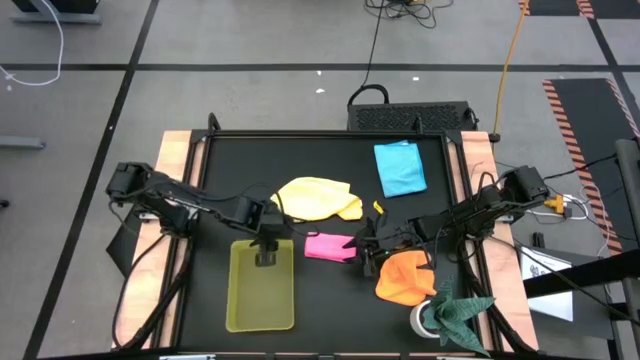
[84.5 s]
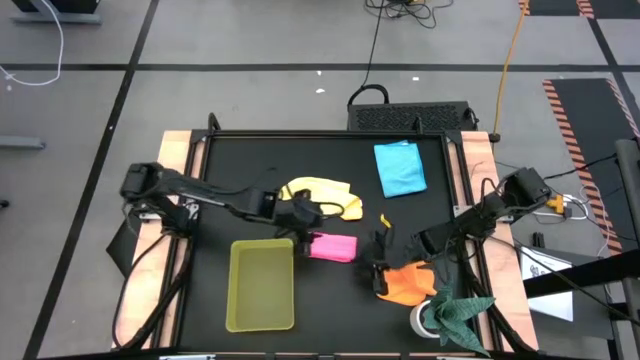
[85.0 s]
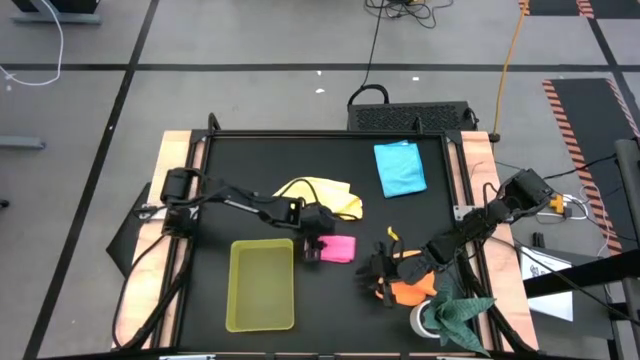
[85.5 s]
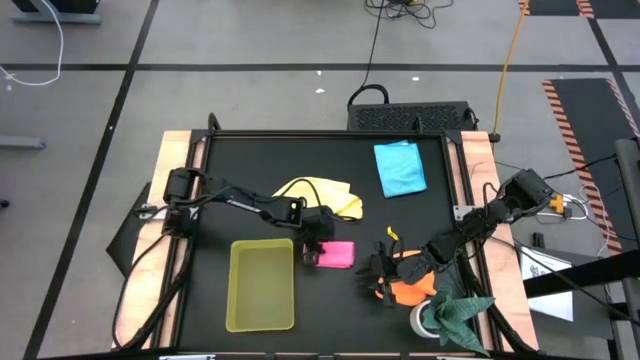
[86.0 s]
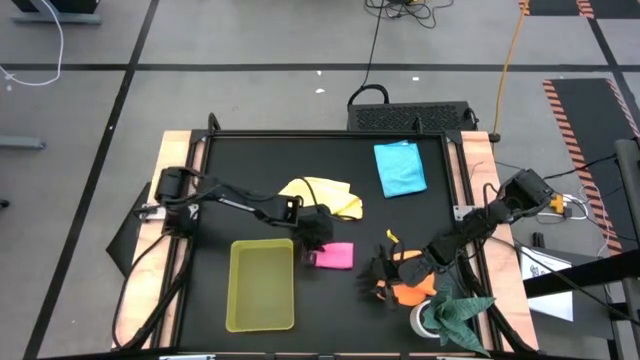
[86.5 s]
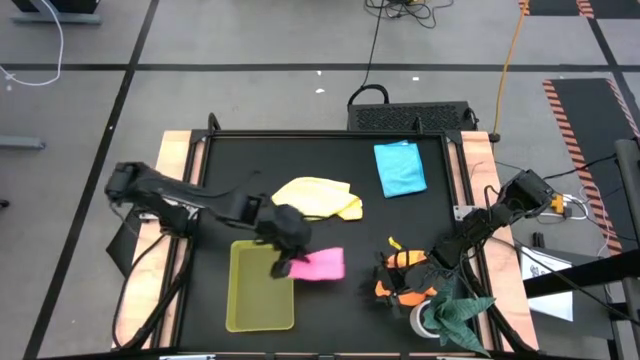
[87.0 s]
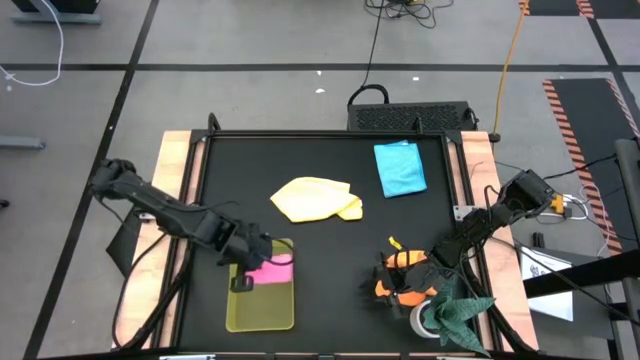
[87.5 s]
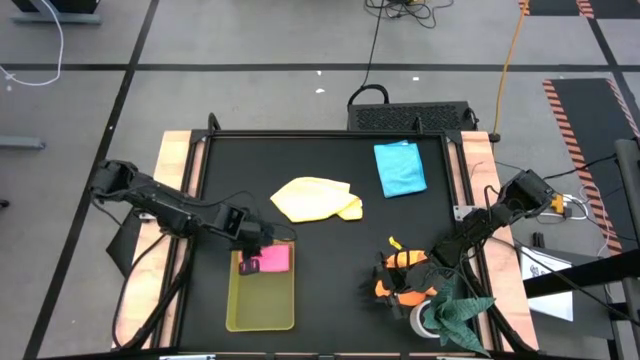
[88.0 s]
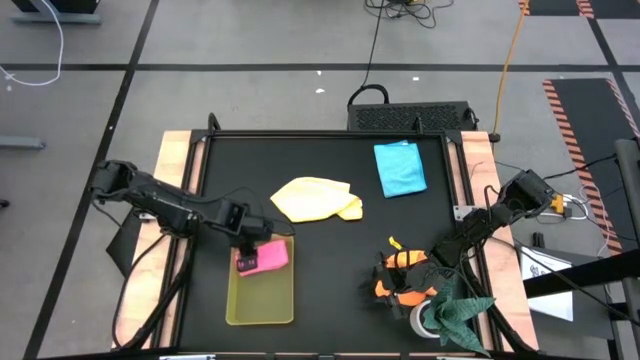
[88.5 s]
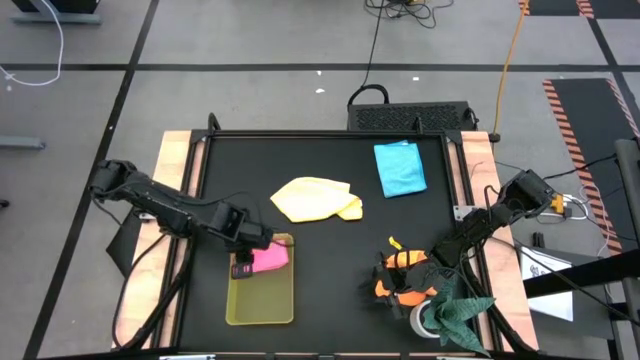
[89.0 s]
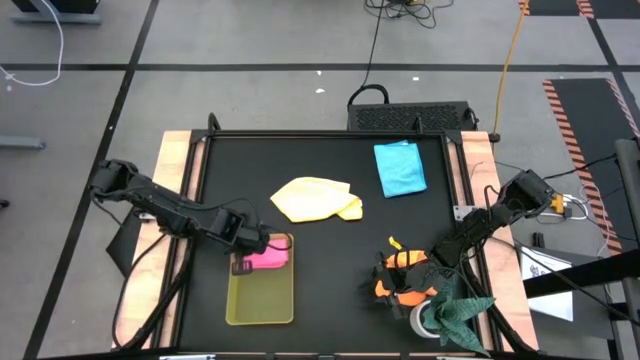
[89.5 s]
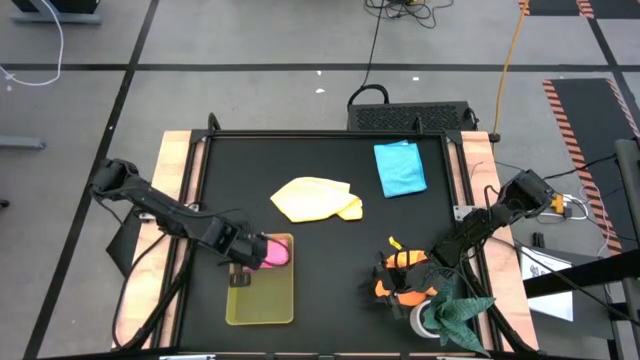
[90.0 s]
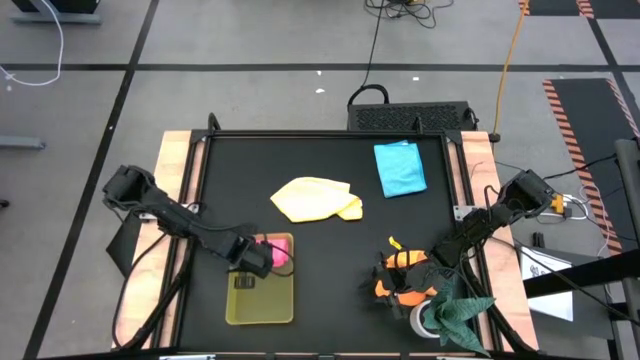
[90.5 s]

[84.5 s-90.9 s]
Task: Fold microfiber towels
Put the pink microfiber towel into the yellow bin

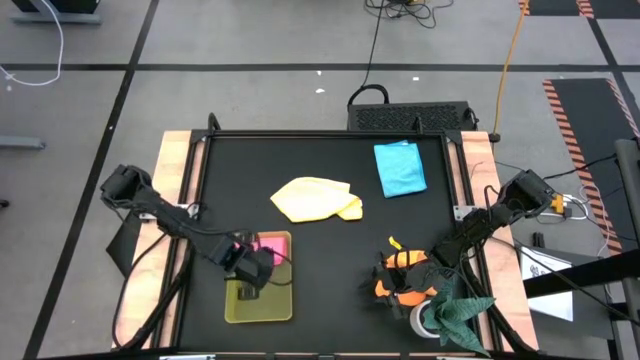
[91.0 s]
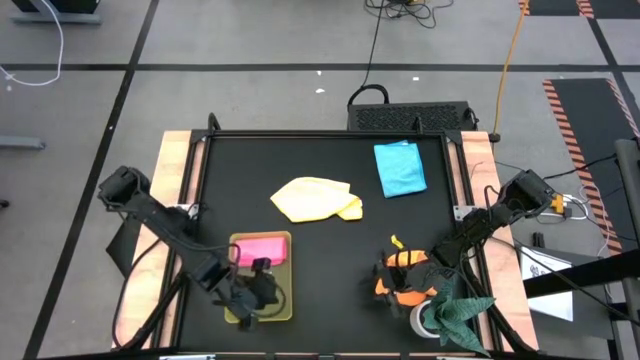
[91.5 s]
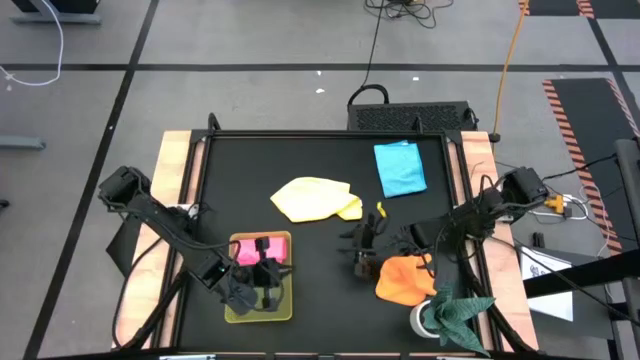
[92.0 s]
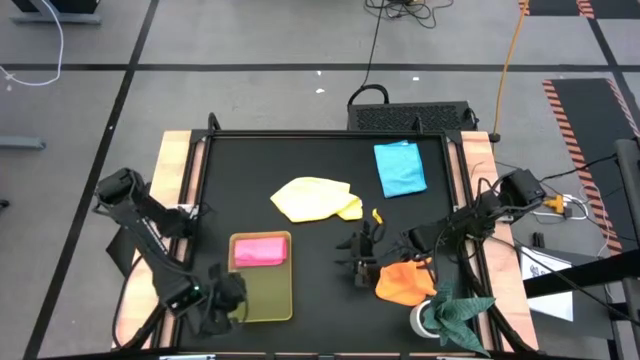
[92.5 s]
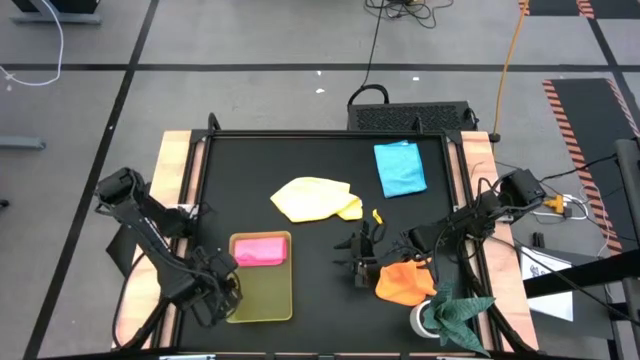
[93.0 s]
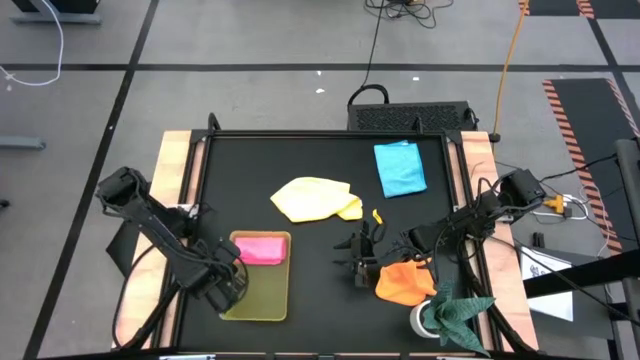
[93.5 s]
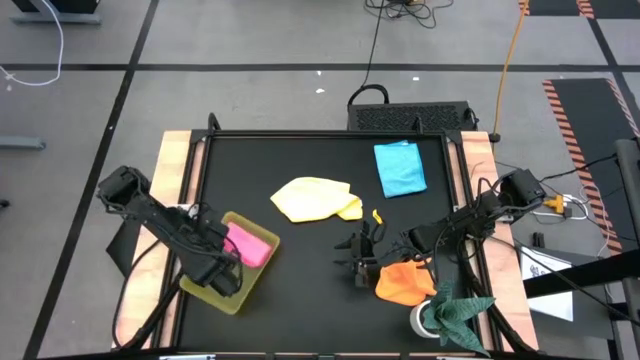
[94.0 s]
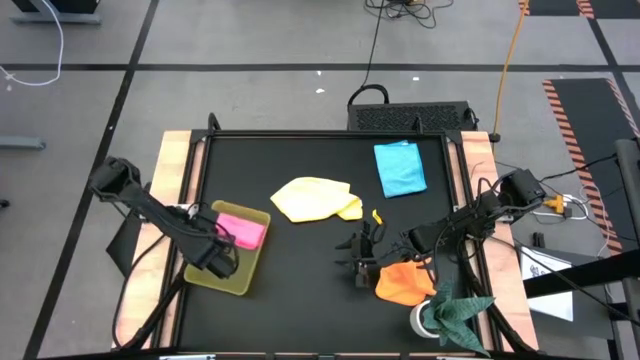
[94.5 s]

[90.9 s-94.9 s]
Adjust the yellow bin on the table

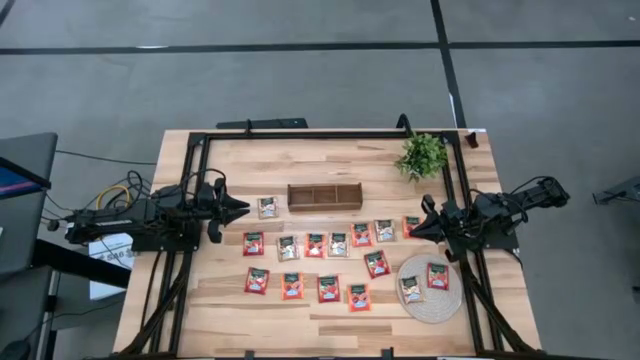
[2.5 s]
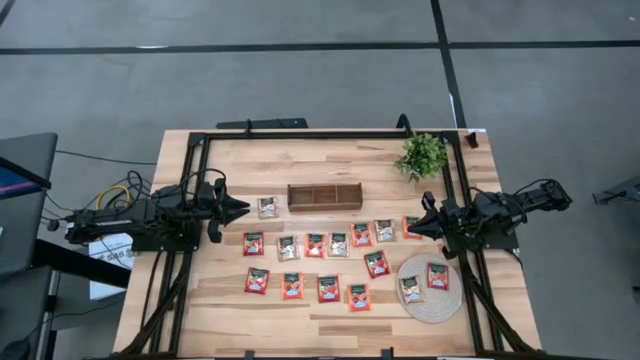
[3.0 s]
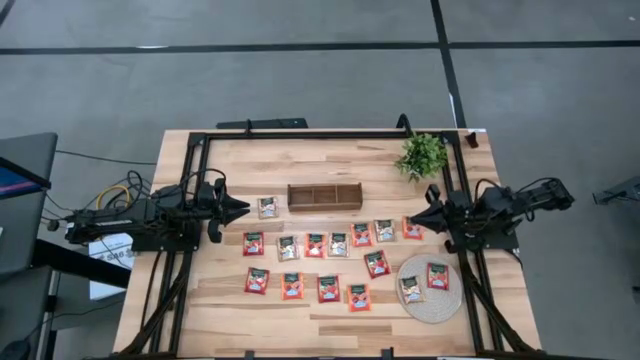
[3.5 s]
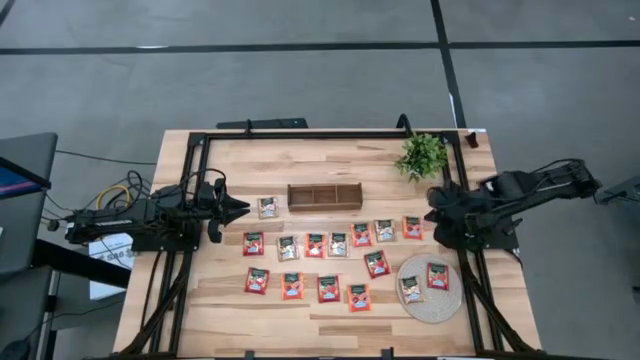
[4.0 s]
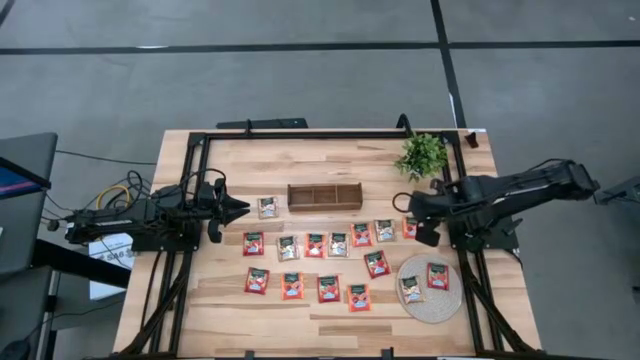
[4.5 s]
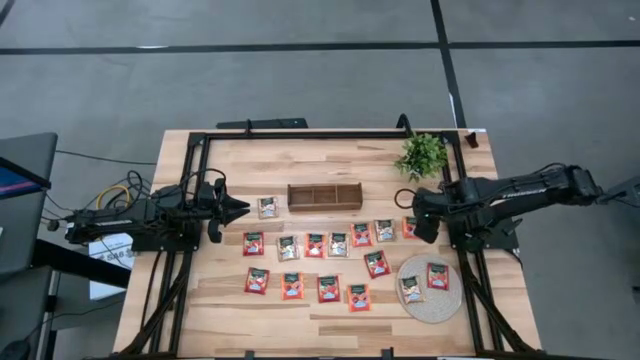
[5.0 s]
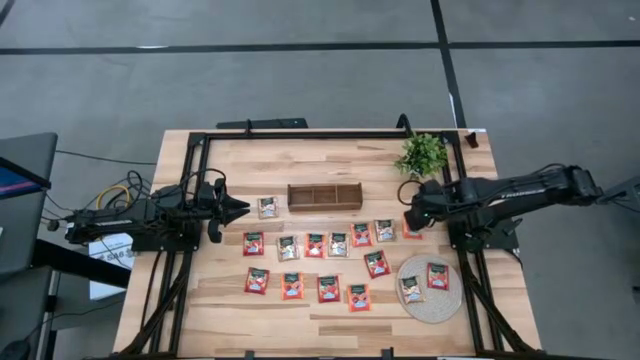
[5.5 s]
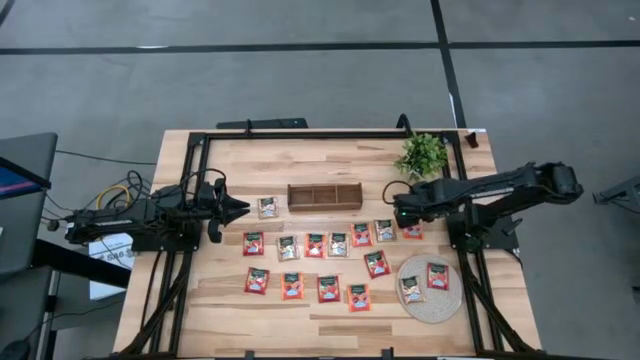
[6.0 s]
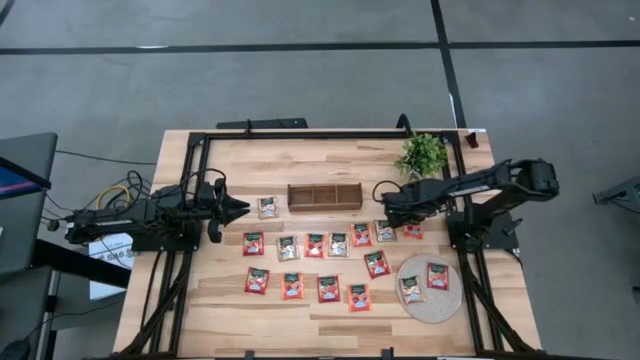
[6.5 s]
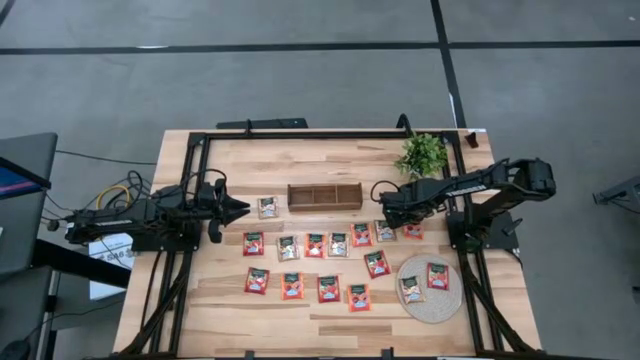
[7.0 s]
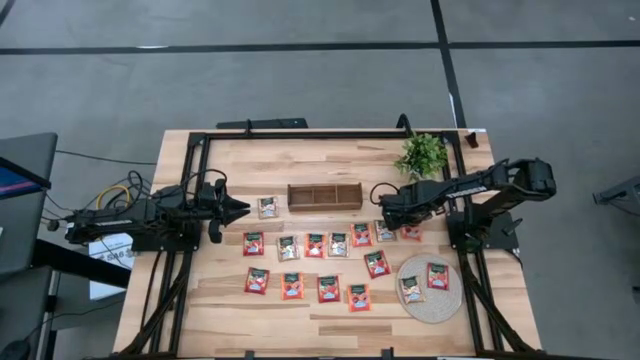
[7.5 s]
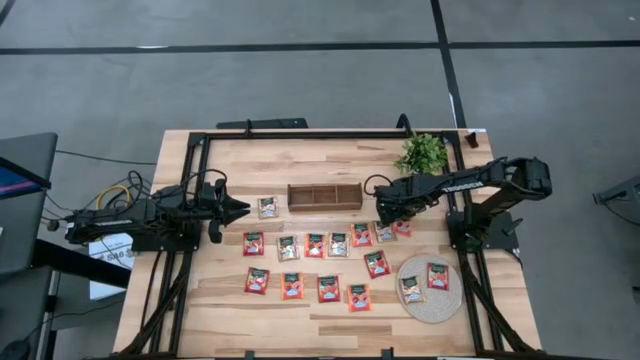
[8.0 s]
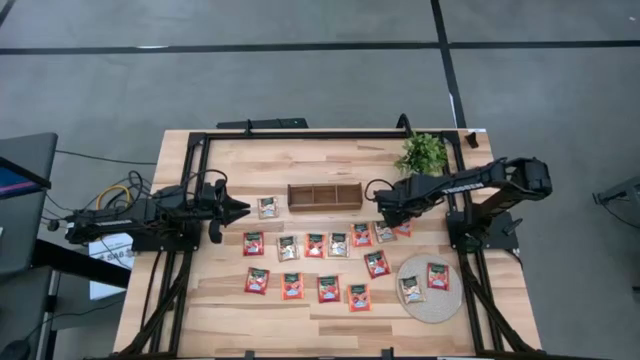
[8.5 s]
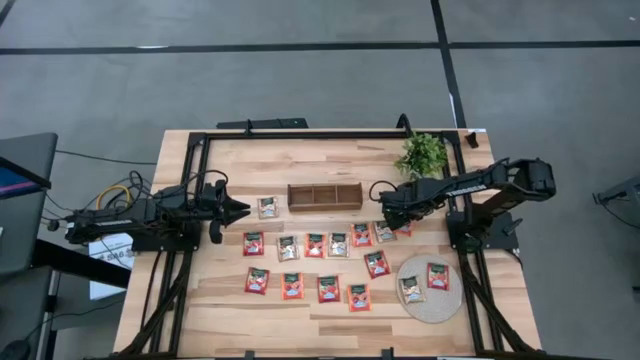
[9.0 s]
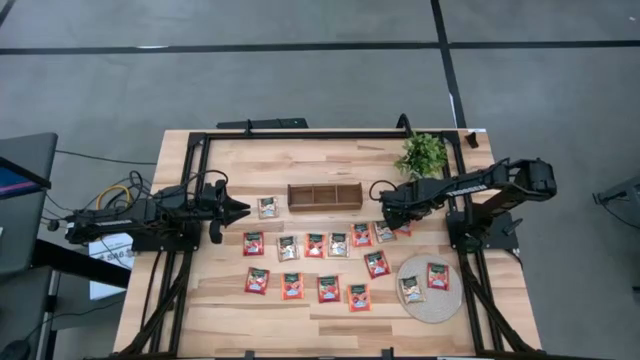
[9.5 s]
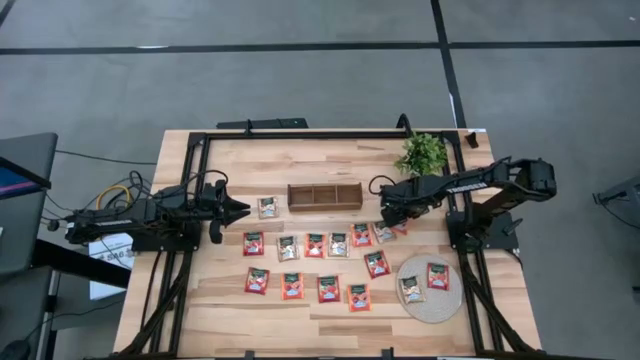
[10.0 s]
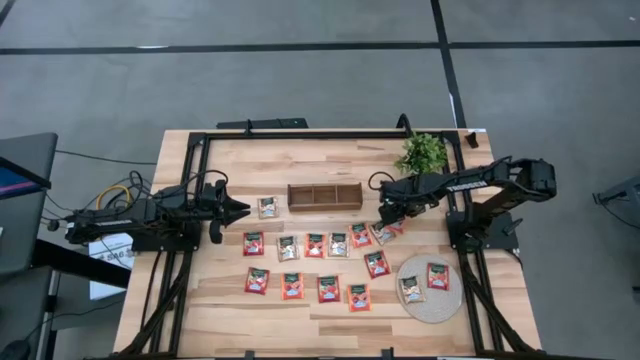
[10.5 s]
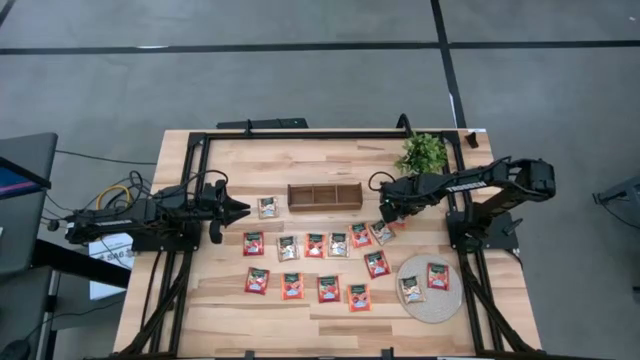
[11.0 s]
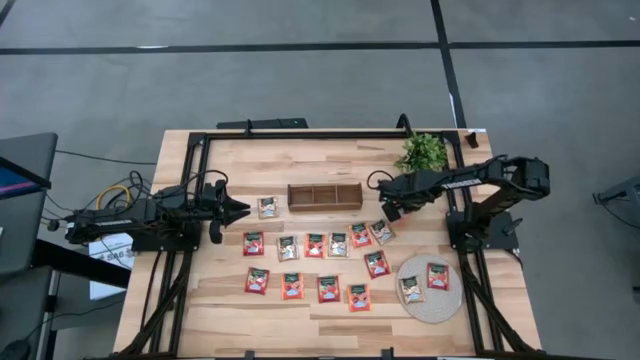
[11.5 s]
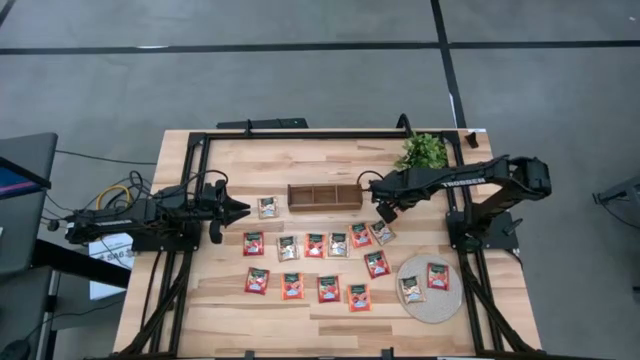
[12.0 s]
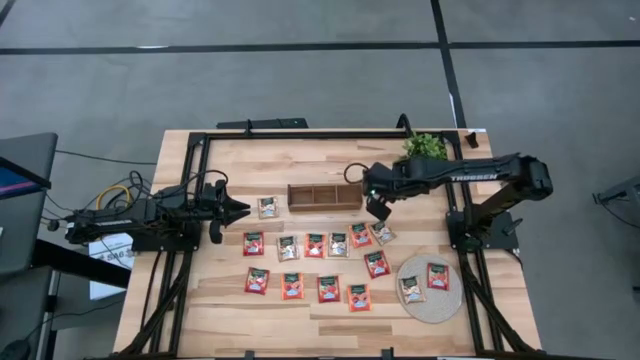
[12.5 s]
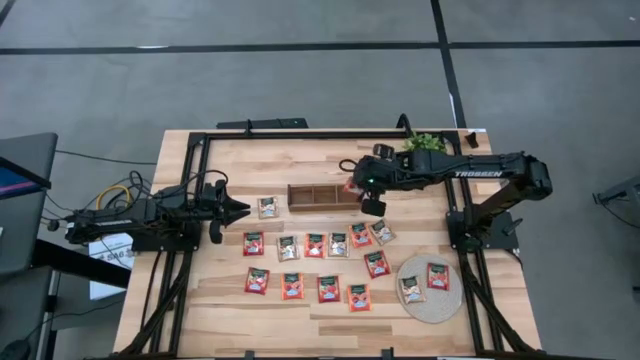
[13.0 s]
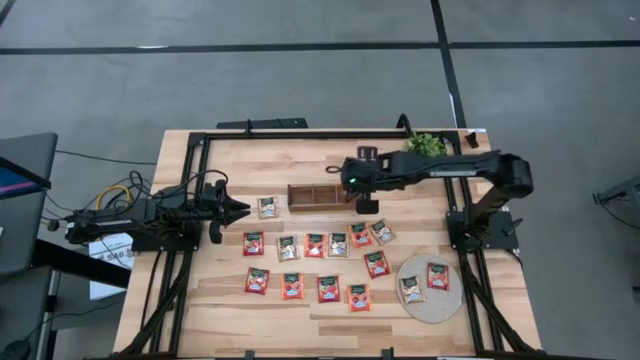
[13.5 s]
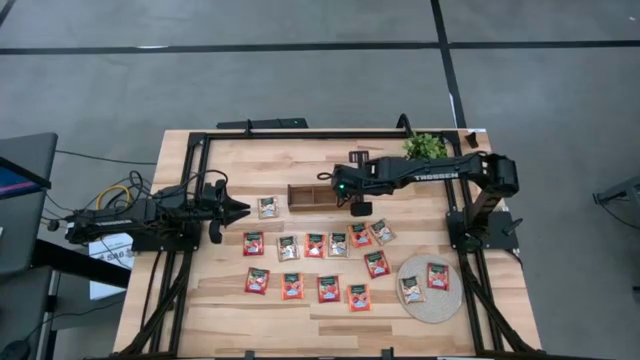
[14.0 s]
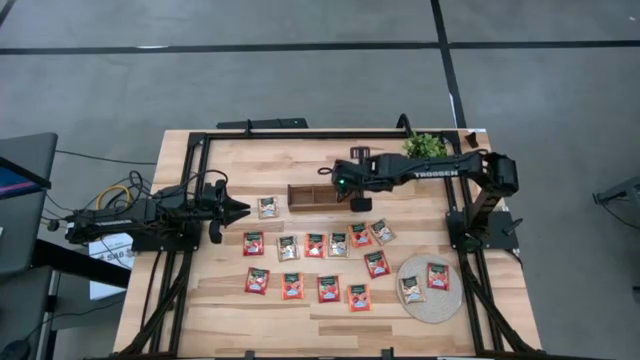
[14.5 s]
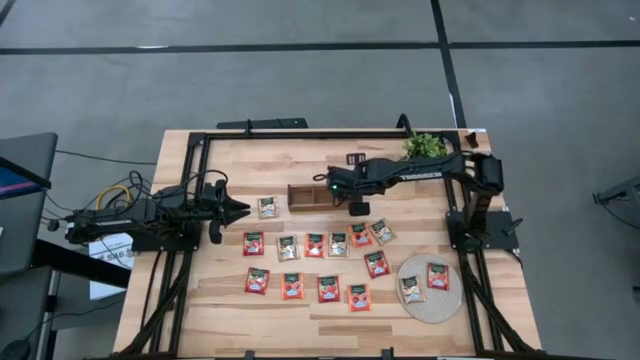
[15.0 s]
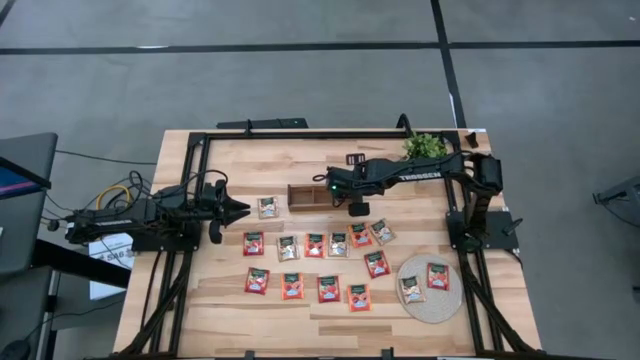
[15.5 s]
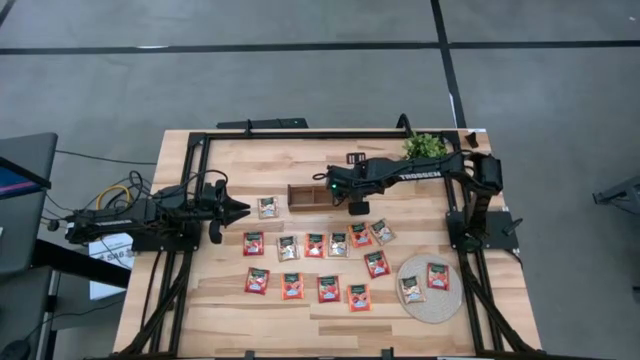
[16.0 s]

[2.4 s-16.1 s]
Task: Pick & Place Tea
Put the orange tea bag into the right section of the wooden organizer
